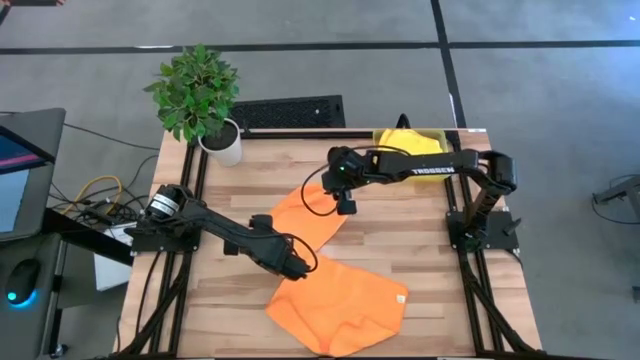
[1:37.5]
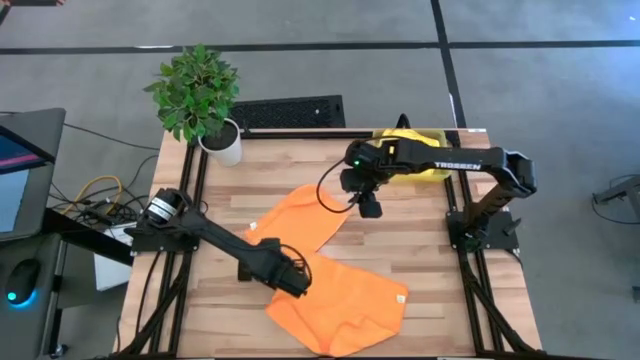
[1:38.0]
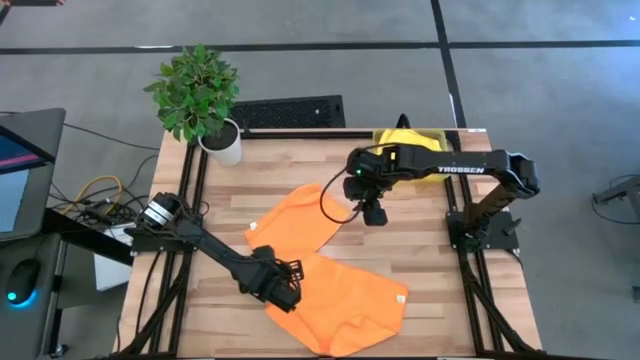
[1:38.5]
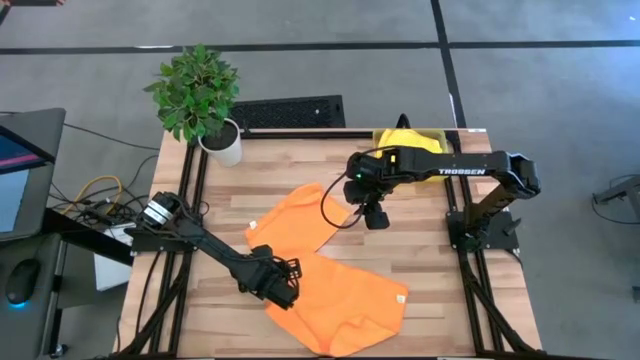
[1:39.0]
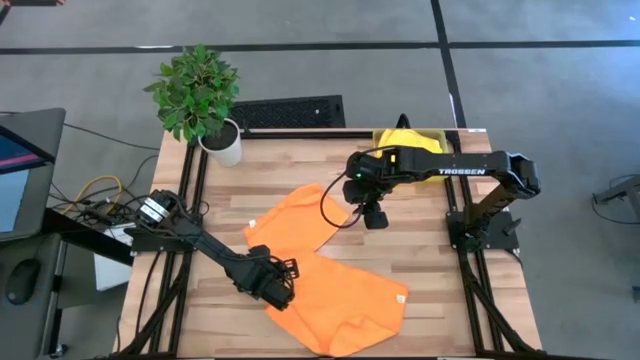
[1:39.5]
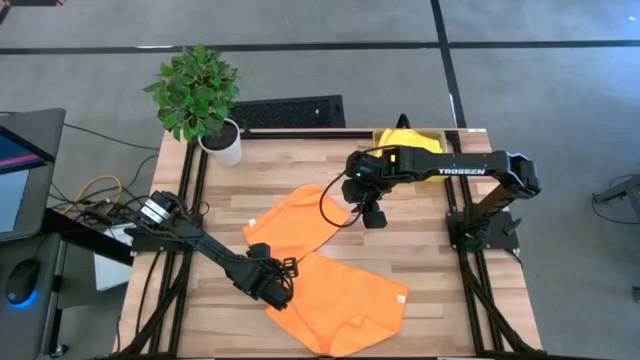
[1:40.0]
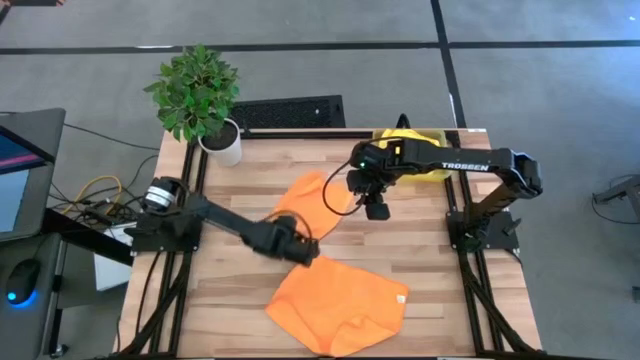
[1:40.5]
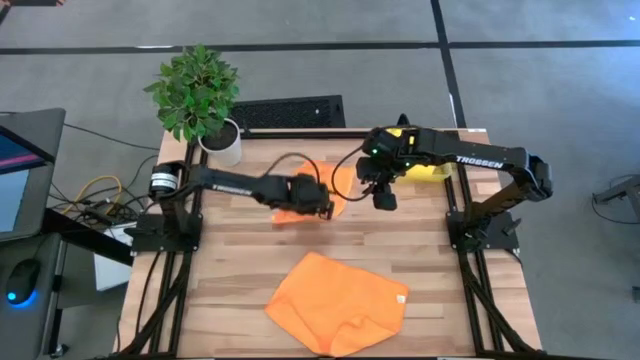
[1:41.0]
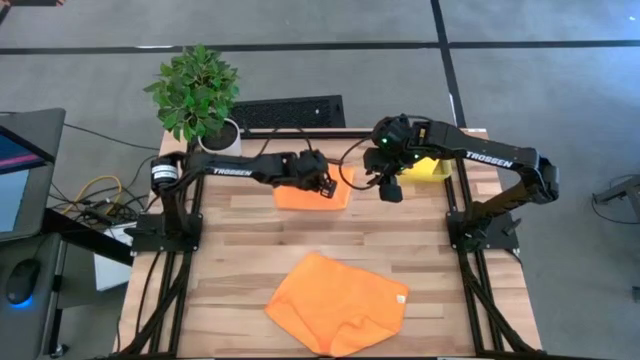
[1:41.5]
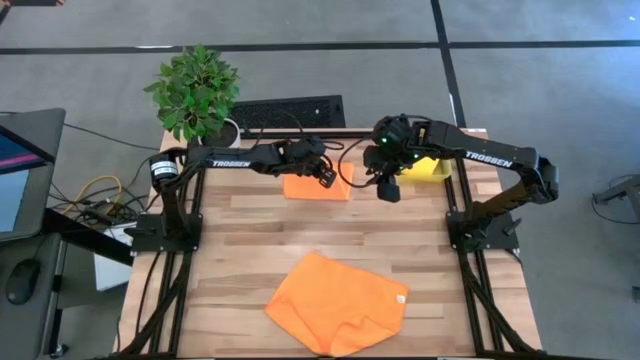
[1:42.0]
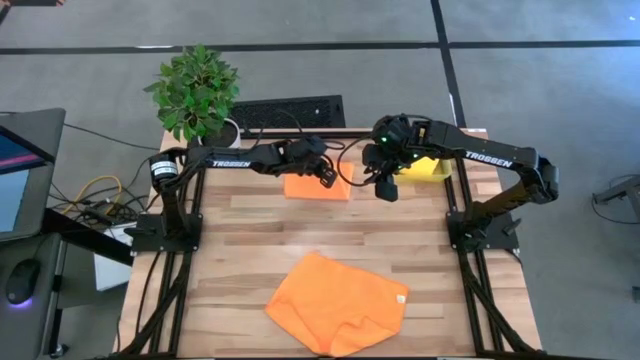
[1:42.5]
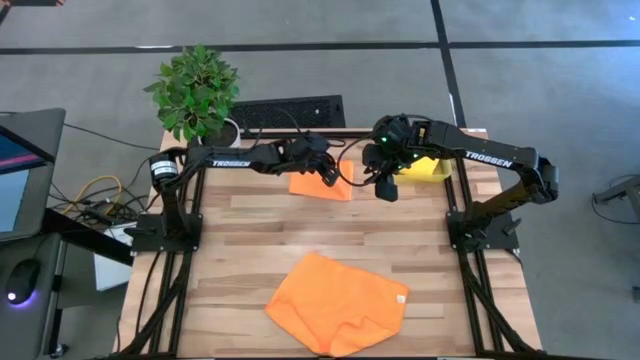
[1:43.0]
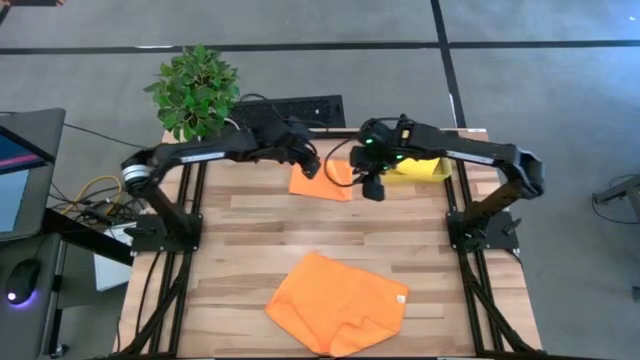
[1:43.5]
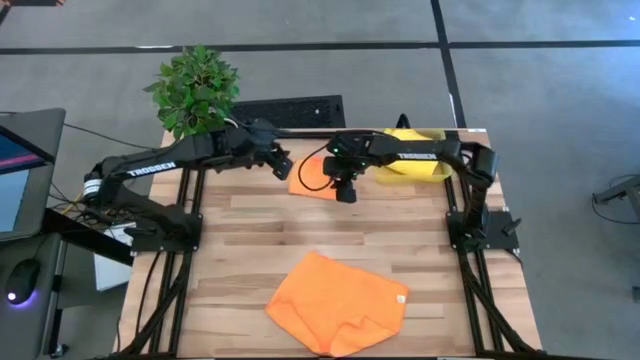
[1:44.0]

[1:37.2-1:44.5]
Task: Fold microfiber towels
Fold the top orange microfiber towel

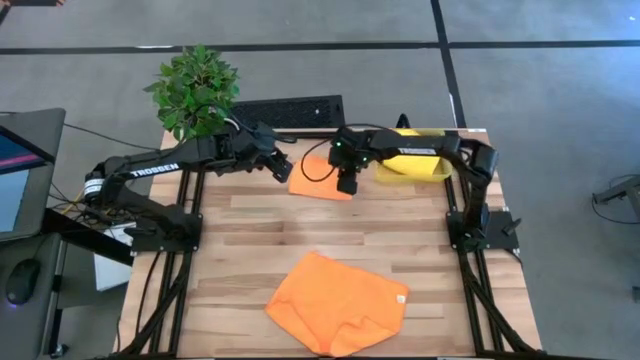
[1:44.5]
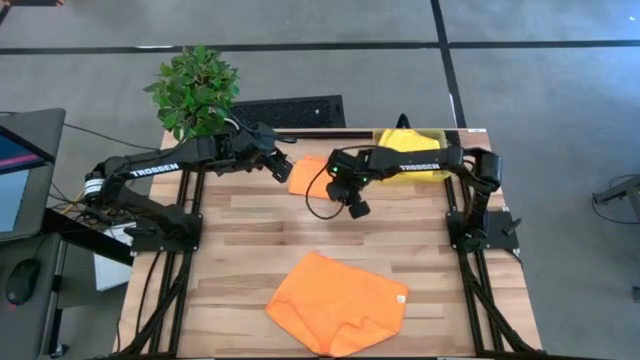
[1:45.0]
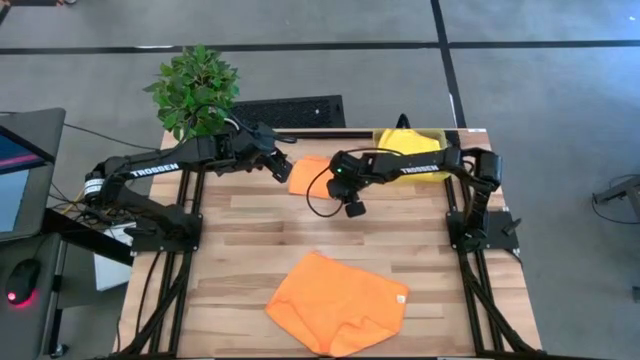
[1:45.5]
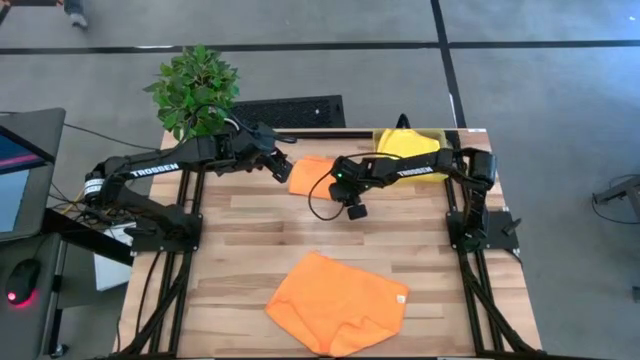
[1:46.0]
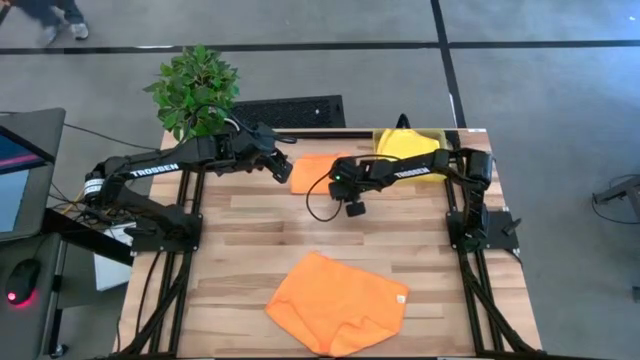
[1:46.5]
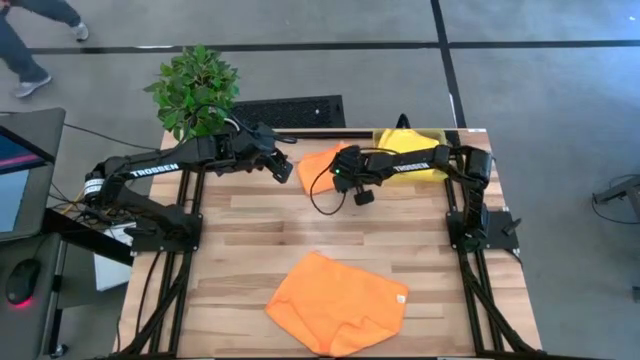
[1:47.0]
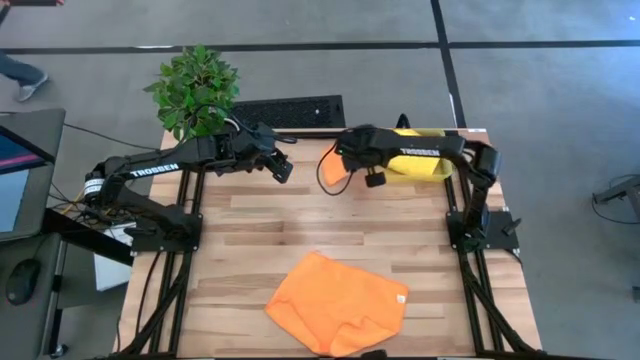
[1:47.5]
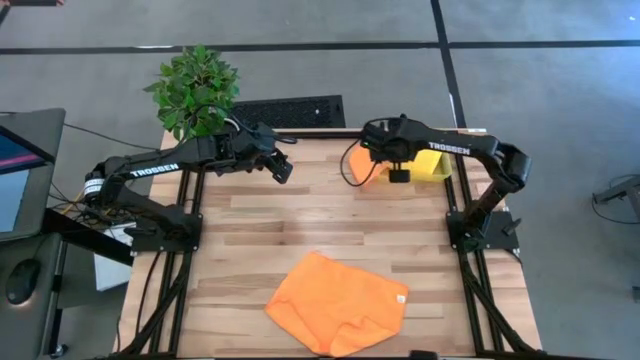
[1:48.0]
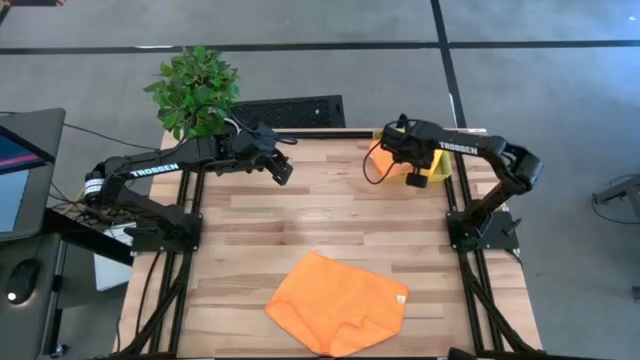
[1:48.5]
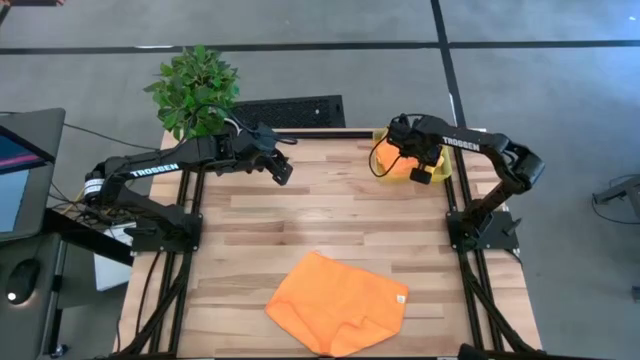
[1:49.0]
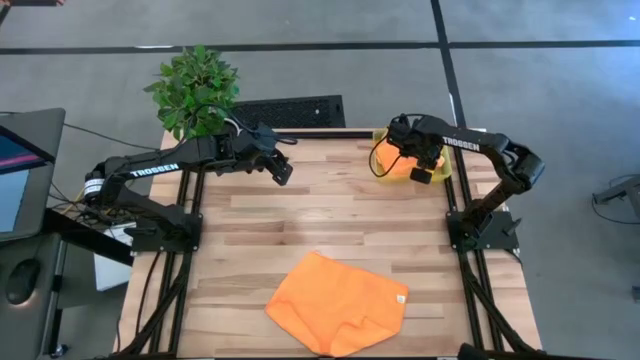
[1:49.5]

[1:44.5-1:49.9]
Put the folded orange microfiber towel into the yellow bin

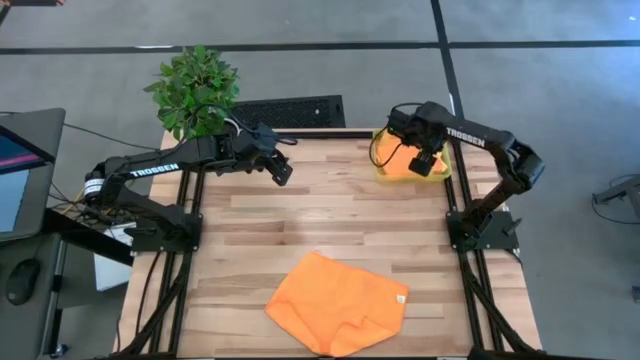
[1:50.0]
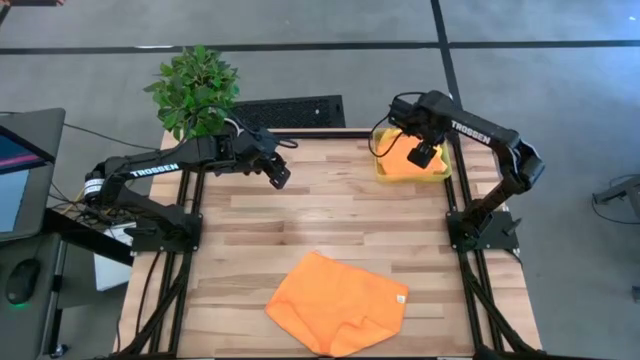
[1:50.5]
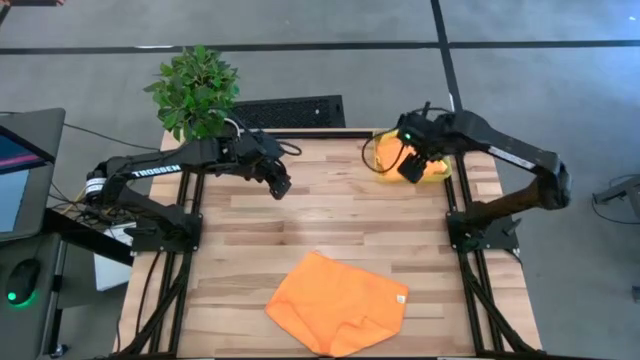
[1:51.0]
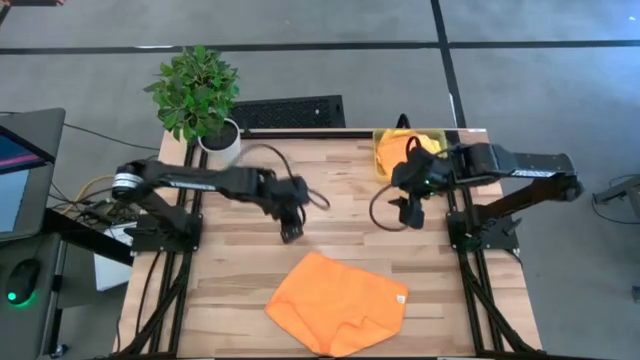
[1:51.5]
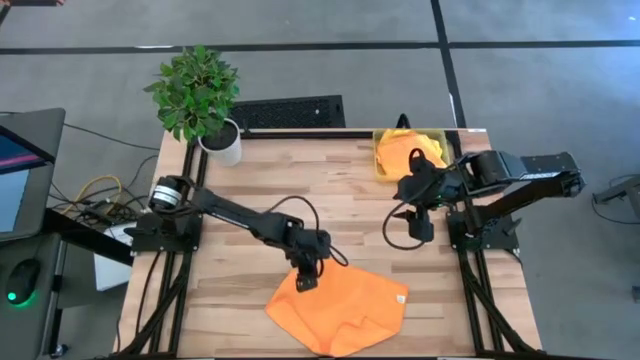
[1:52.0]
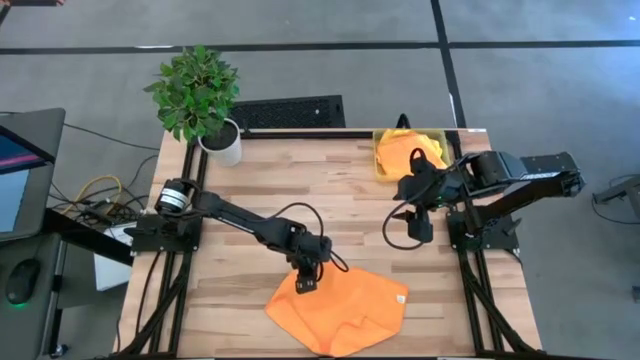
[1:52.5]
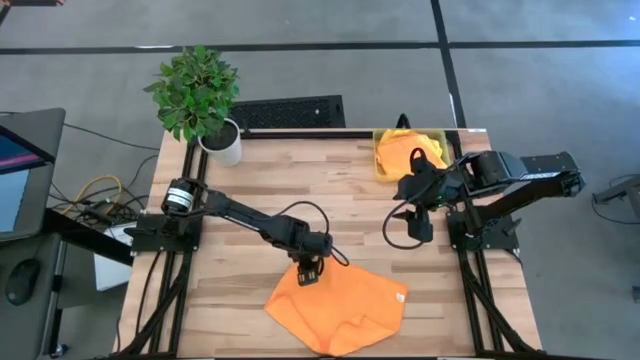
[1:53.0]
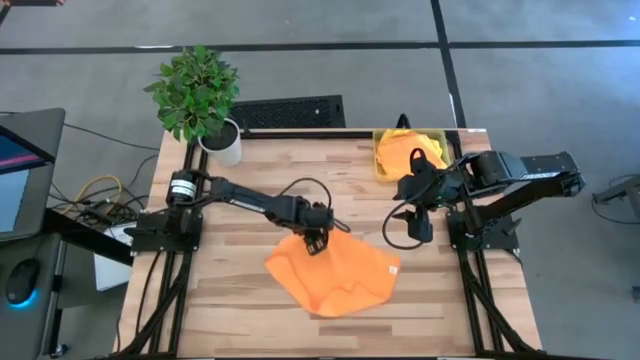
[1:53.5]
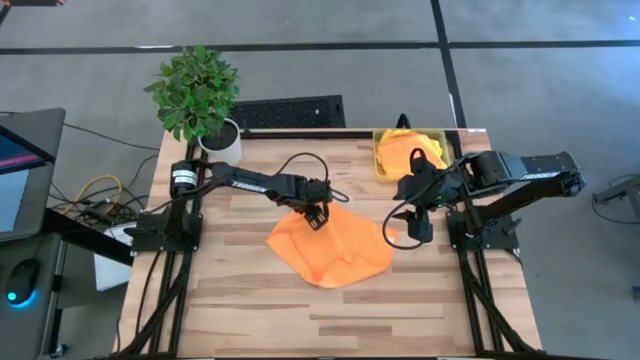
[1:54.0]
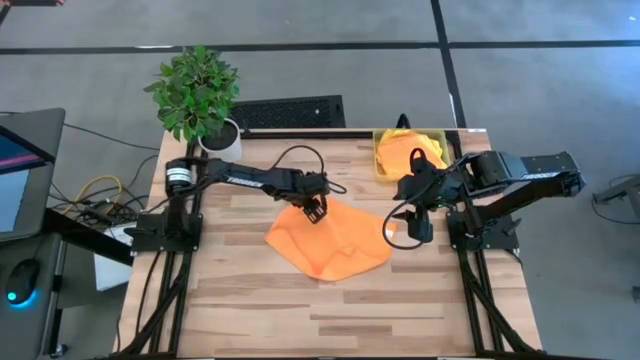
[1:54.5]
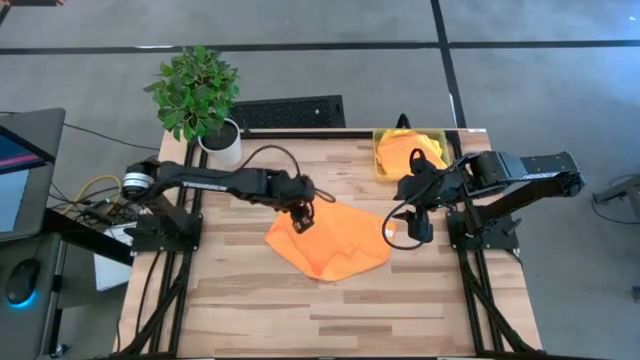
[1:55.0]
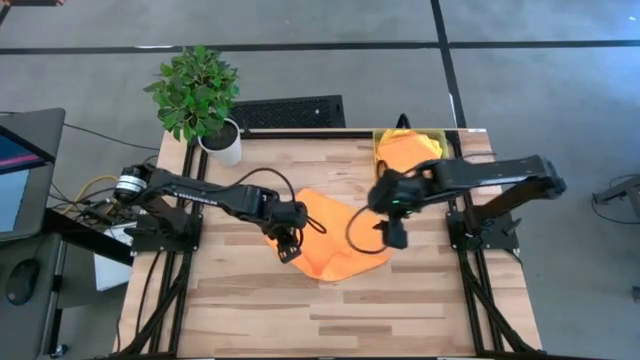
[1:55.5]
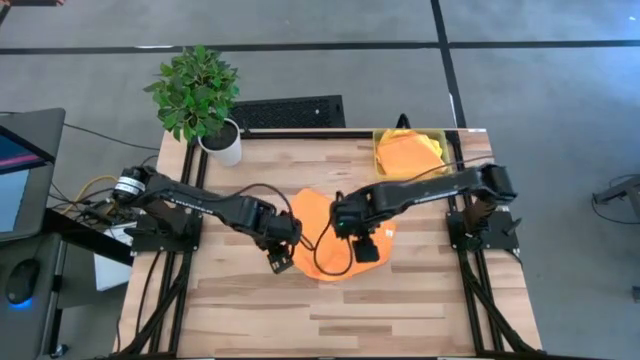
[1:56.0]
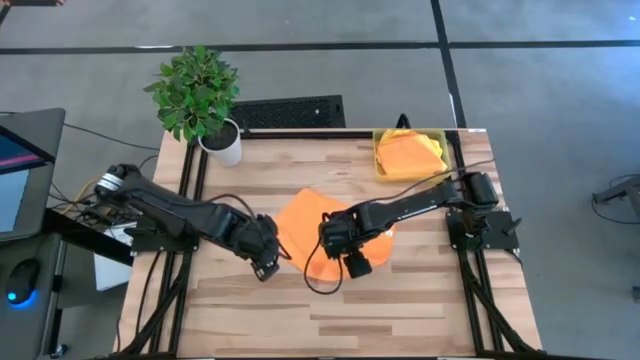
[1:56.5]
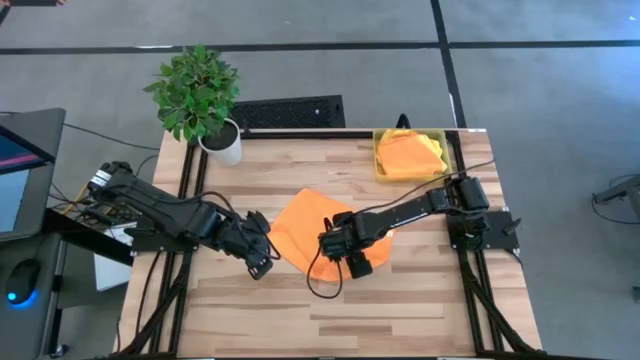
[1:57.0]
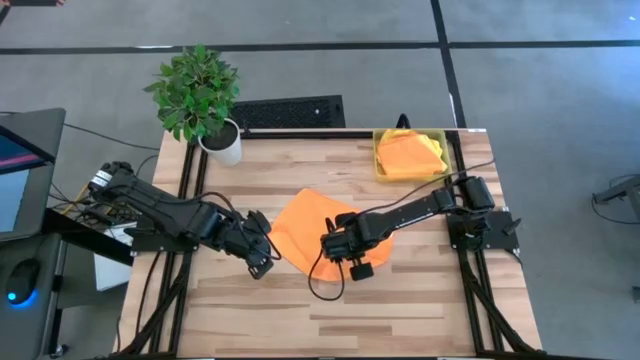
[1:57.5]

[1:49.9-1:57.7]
Fold the orange microfiber towel
